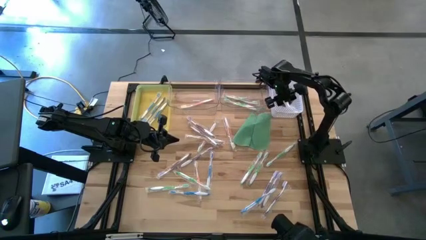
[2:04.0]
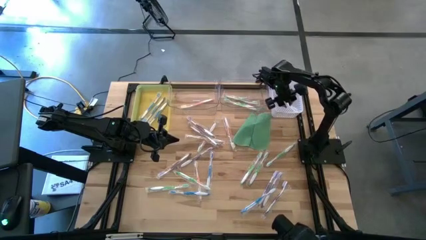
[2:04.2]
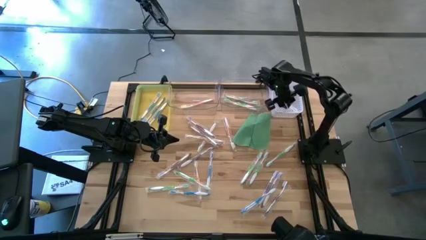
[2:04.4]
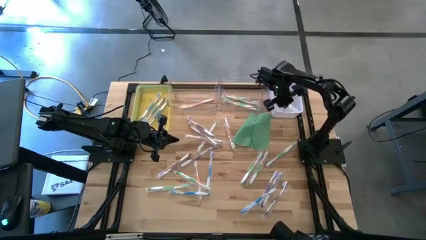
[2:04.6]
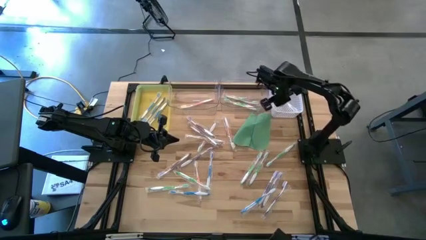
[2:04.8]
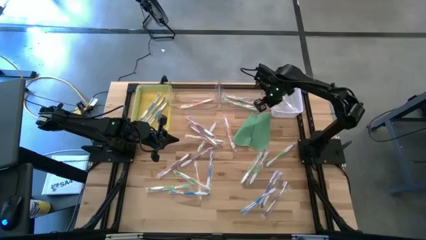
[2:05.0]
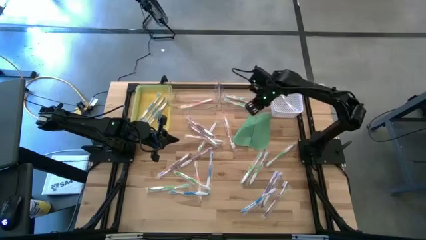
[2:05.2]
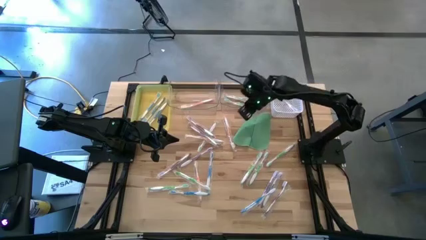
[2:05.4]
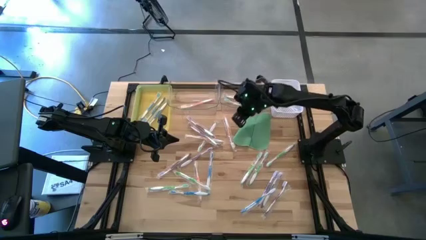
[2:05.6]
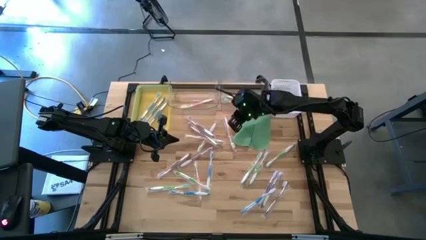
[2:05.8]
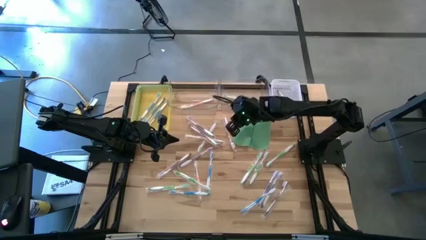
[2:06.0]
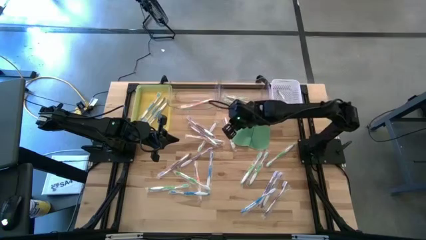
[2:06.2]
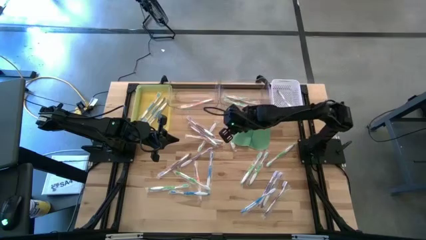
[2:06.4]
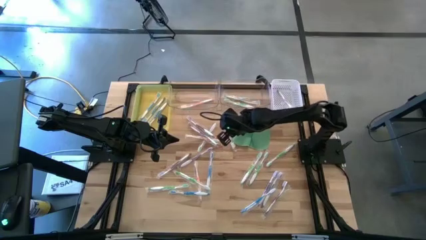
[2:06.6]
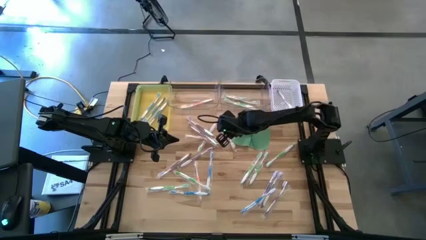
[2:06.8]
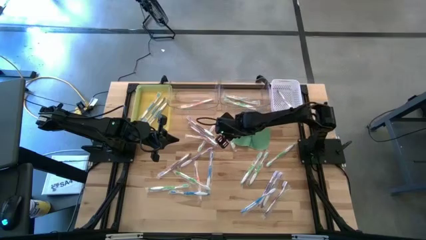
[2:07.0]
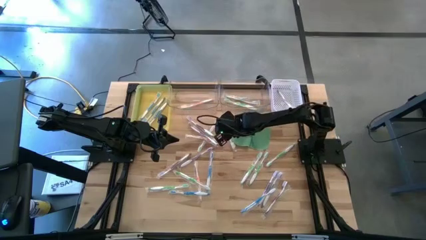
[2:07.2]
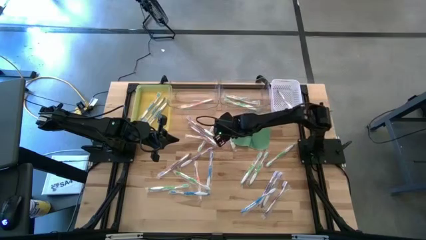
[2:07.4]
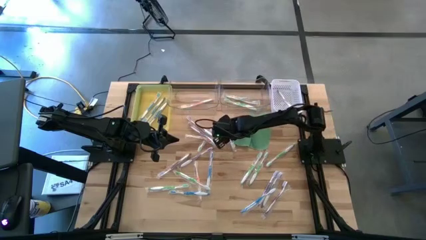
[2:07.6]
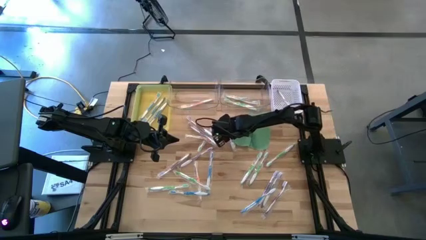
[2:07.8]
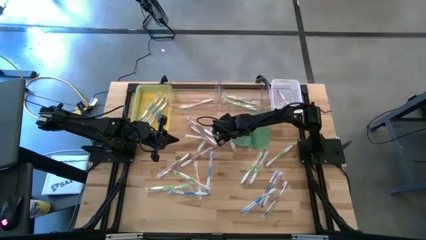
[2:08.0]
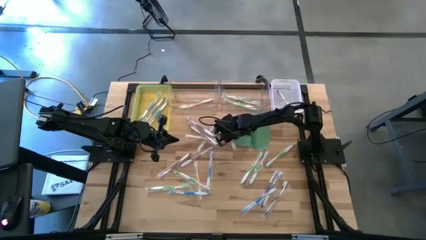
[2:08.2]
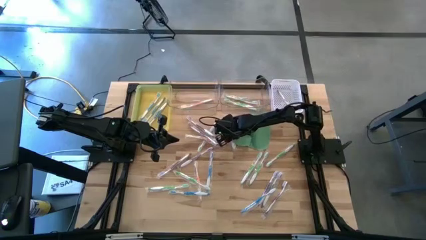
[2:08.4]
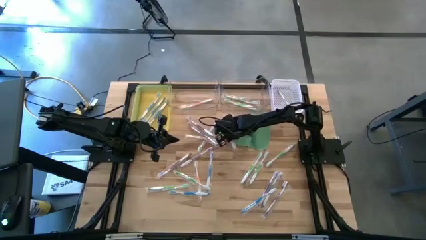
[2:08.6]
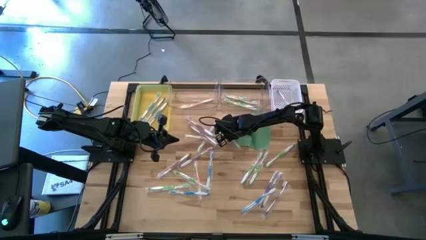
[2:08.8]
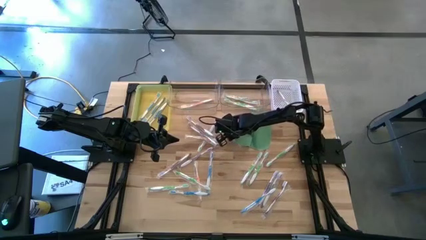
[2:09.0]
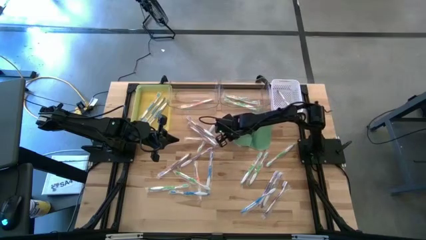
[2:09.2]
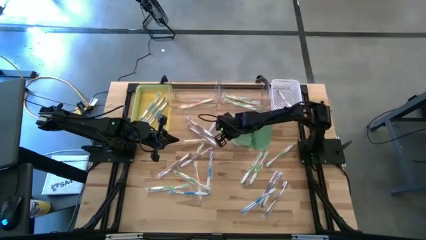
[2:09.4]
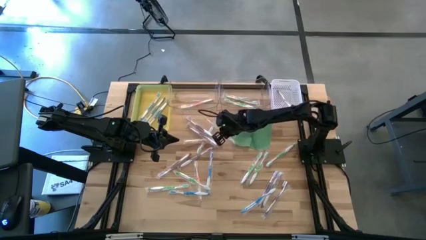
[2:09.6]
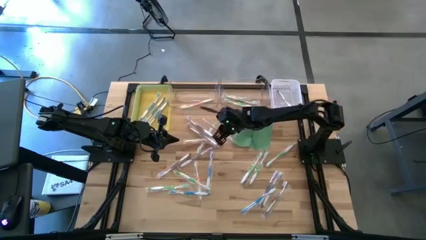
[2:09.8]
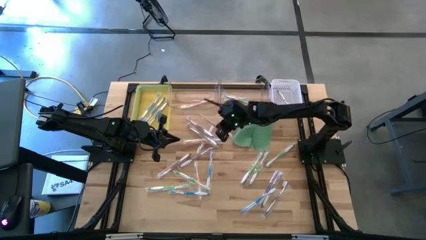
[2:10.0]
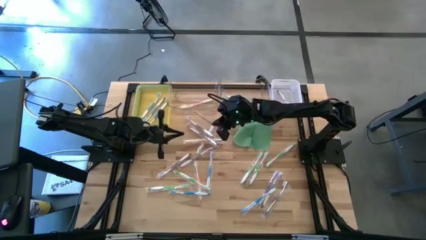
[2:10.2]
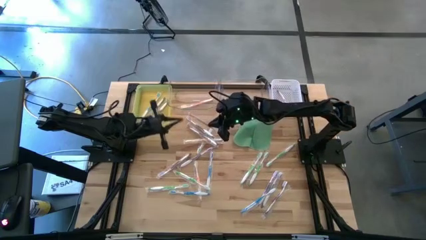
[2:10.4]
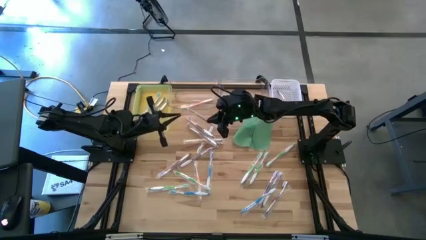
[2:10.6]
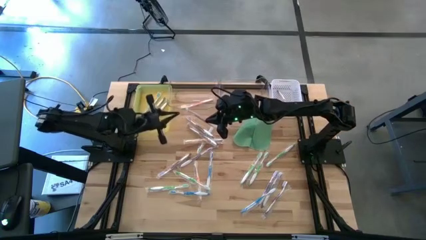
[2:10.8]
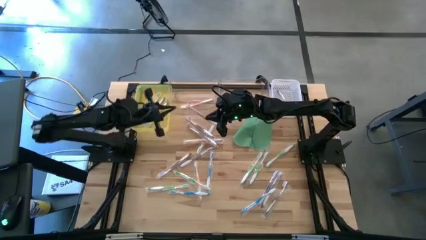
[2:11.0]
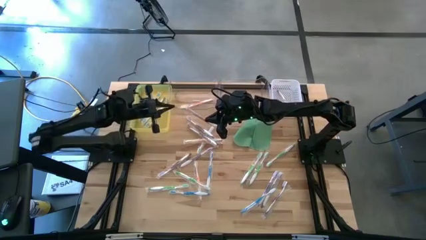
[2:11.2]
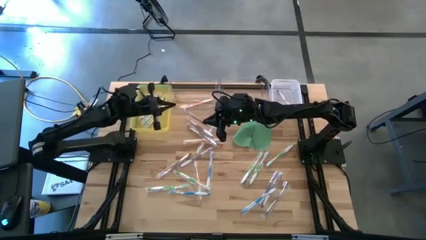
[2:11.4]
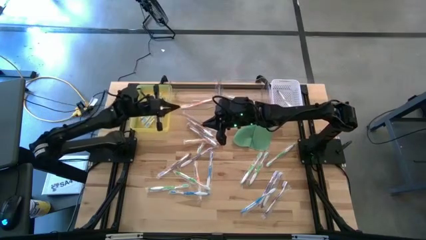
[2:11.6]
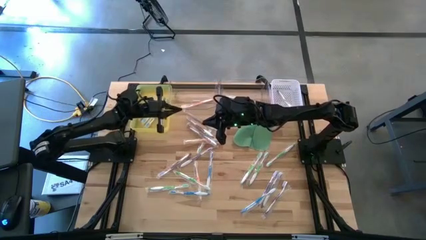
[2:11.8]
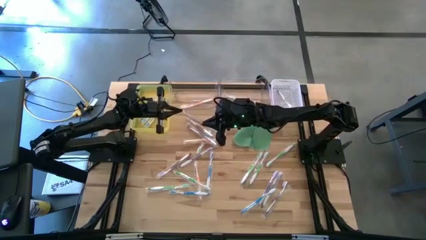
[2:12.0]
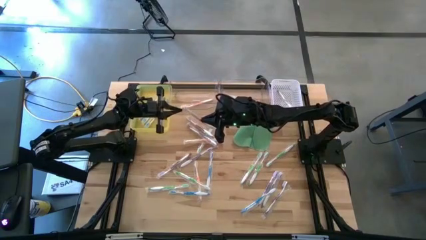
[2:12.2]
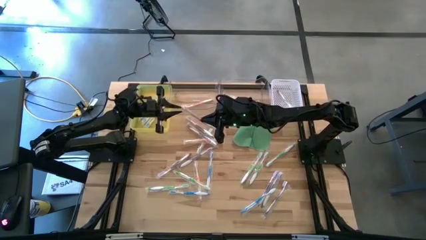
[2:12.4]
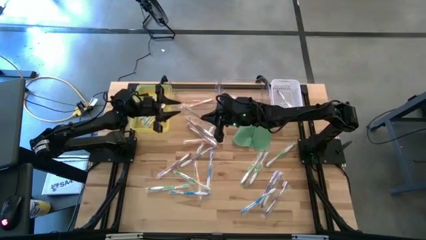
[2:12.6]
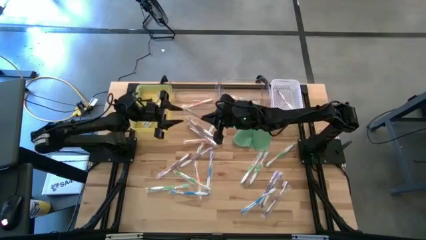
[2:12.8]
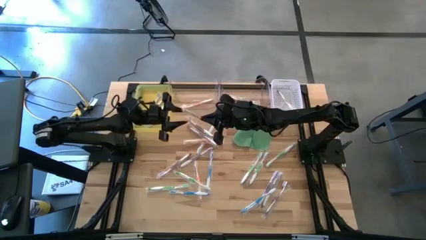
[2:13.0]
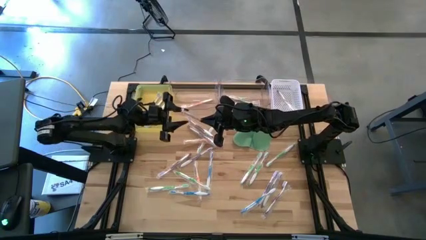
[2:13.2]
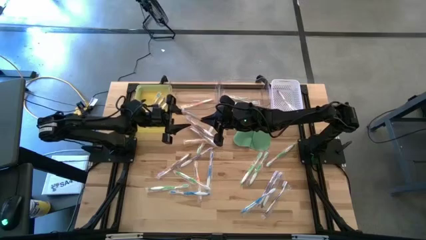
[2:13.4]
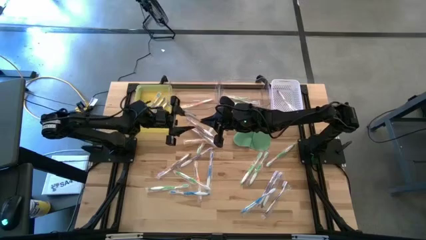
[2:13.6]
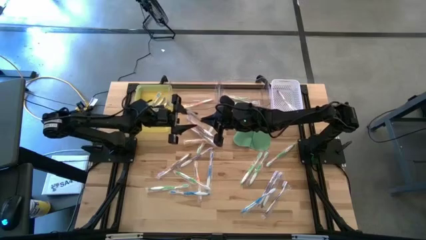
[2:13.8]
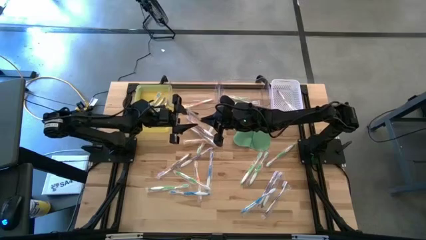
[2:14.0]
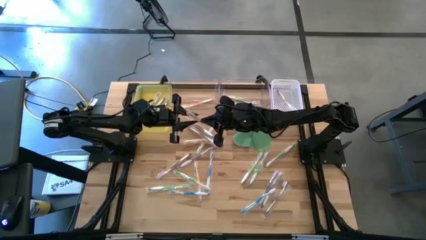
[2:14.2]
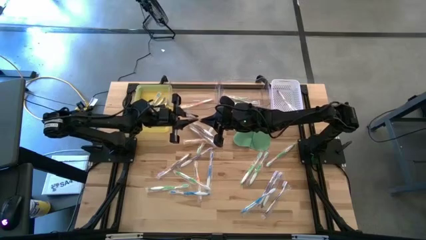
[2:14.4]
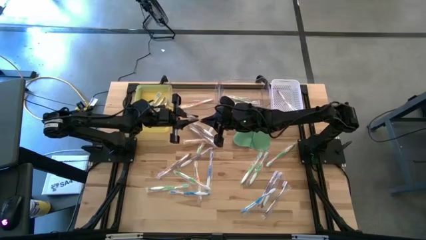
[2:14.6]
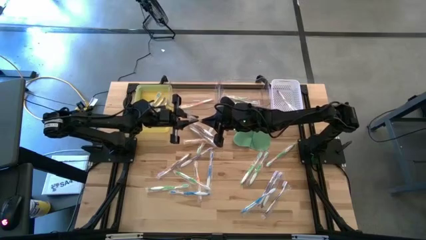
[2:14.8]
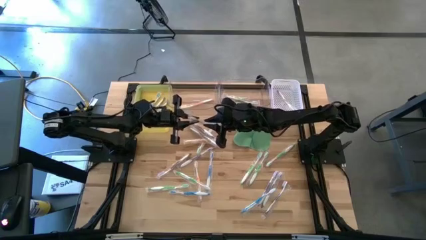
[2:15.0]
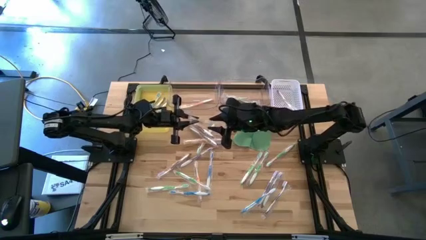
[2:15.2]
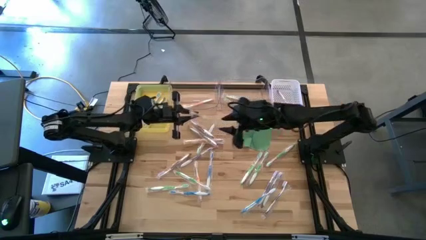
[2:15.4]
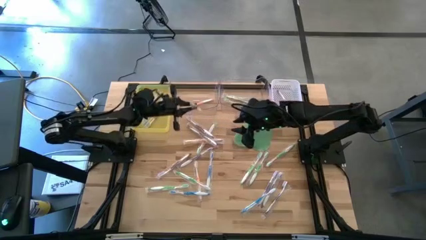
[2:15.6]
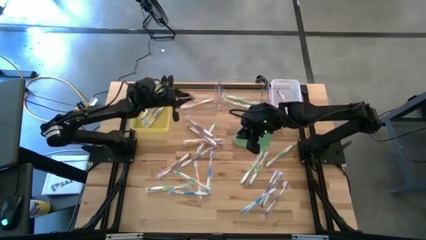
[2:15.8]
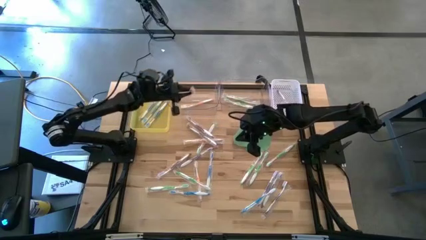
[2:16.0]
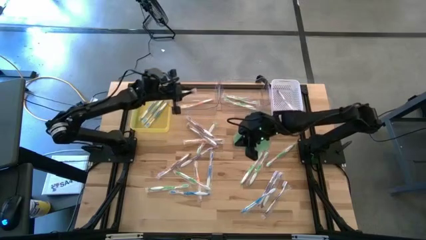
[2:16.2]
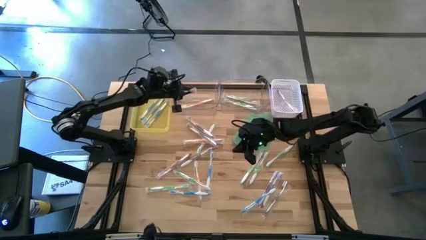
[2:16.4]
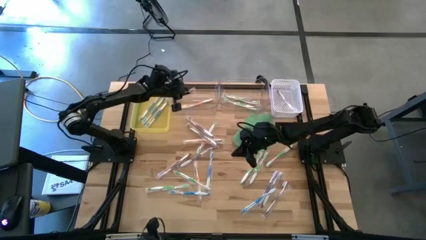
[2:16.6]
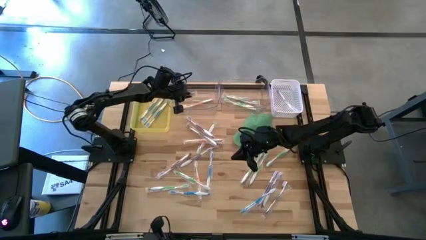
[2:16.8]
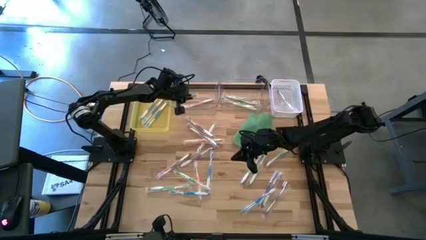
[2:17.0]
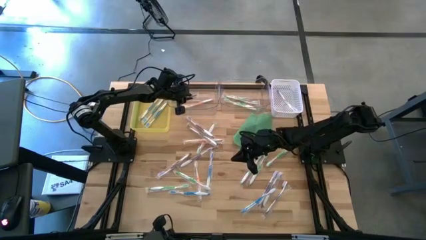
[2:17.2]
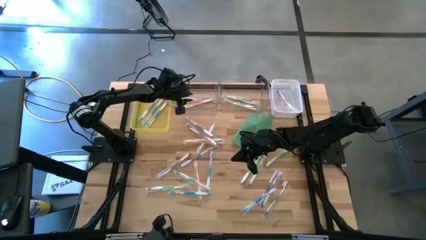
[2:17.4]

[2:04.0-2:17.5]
Task: Pick & Place Toothbrushes
Put the orange toothbrush into the left transparent bin
